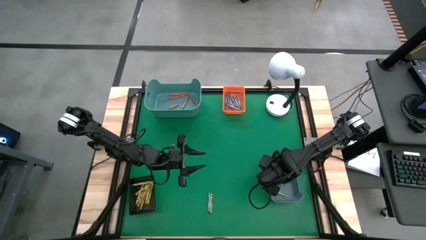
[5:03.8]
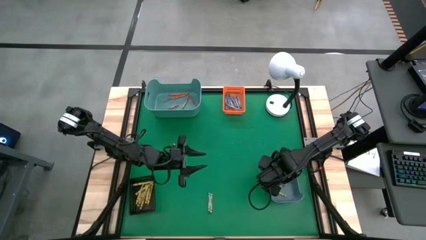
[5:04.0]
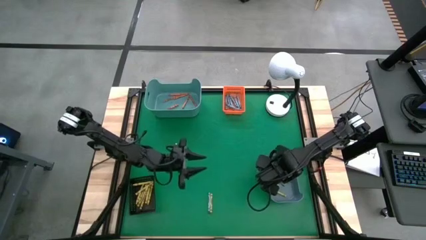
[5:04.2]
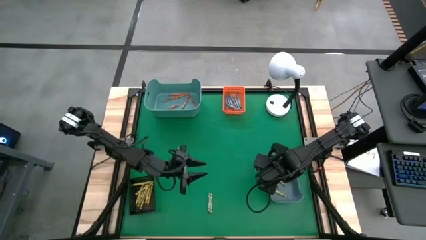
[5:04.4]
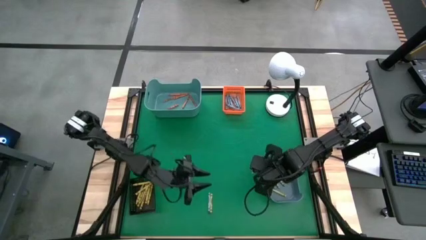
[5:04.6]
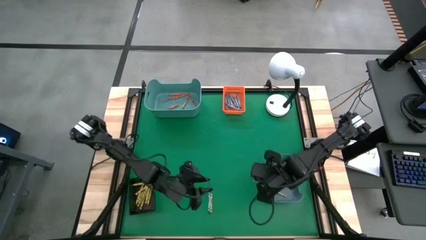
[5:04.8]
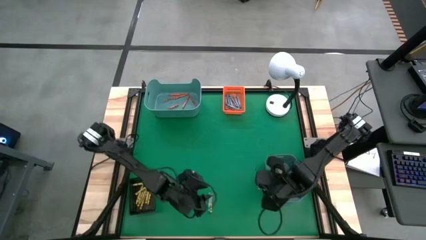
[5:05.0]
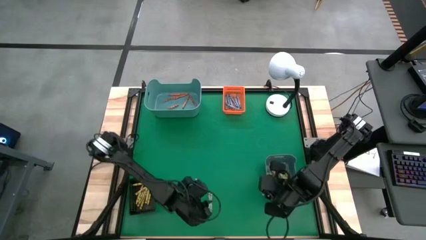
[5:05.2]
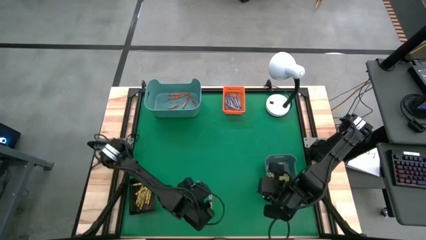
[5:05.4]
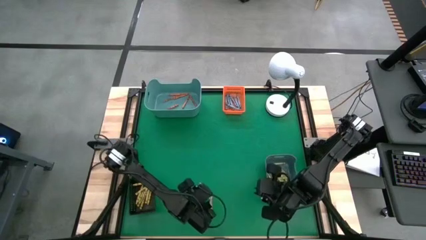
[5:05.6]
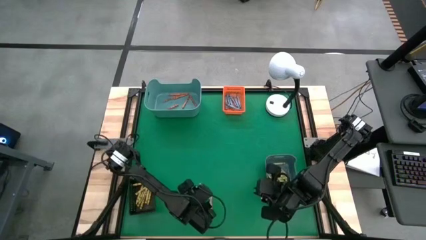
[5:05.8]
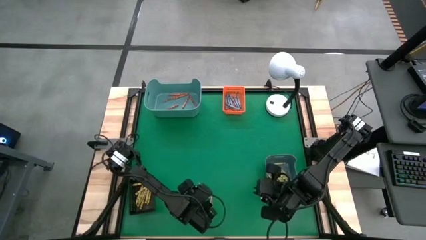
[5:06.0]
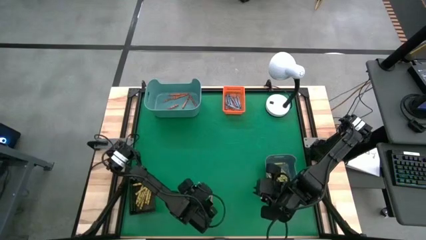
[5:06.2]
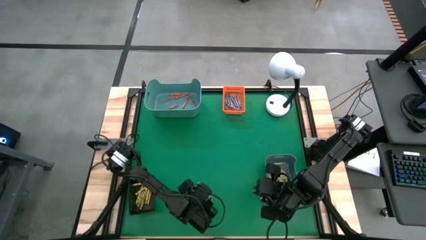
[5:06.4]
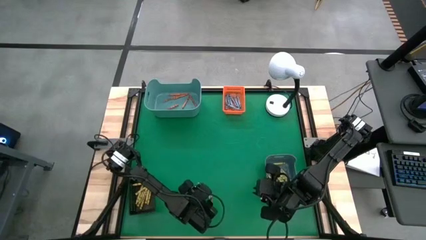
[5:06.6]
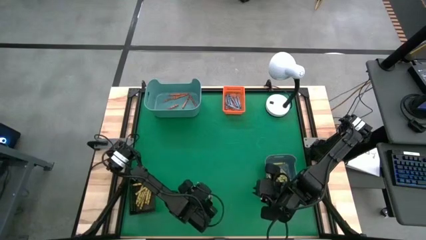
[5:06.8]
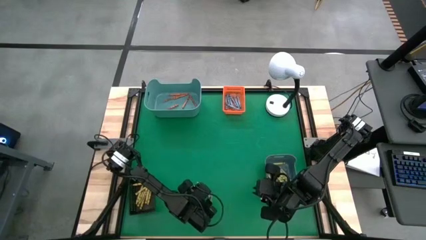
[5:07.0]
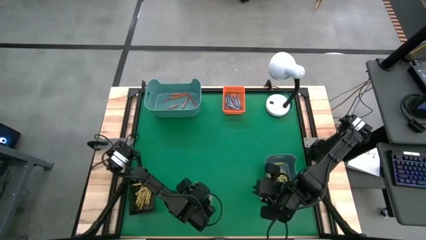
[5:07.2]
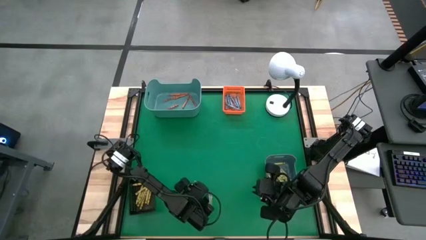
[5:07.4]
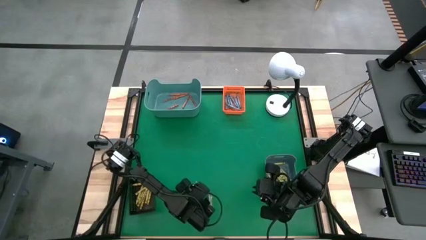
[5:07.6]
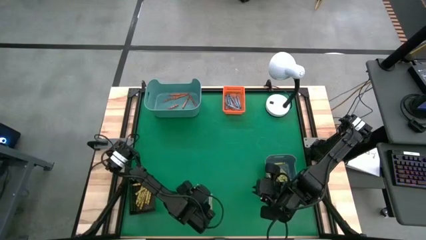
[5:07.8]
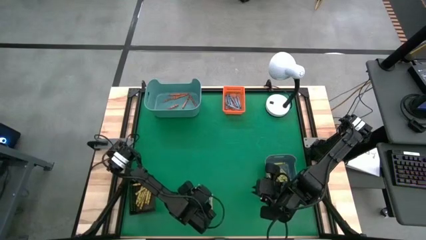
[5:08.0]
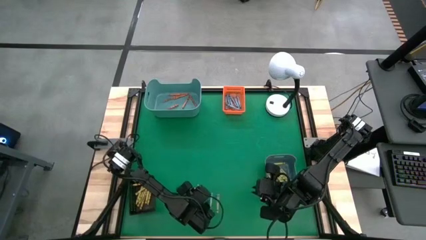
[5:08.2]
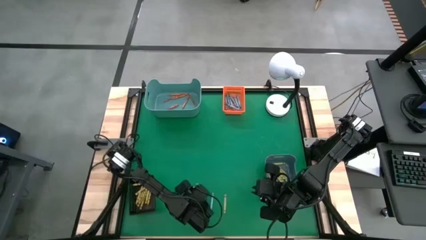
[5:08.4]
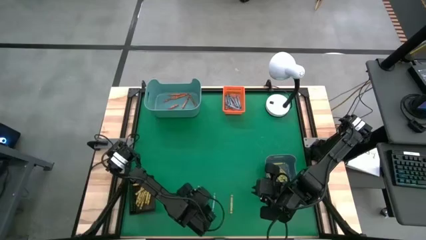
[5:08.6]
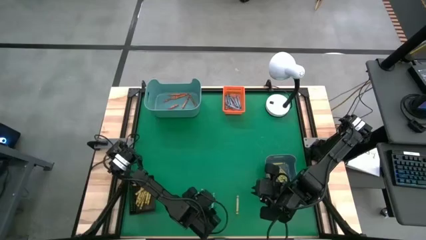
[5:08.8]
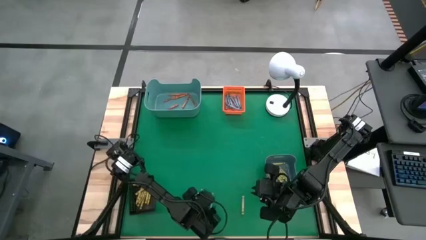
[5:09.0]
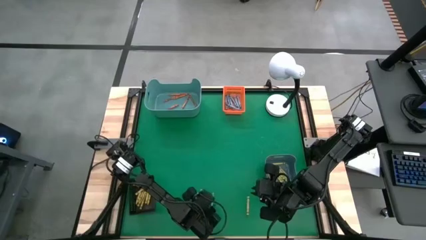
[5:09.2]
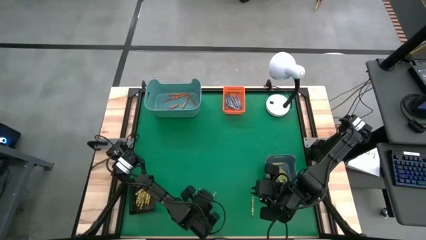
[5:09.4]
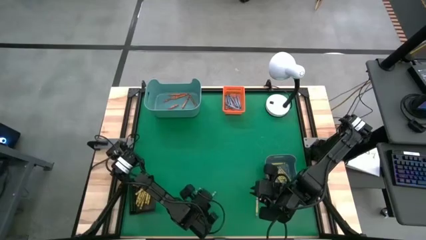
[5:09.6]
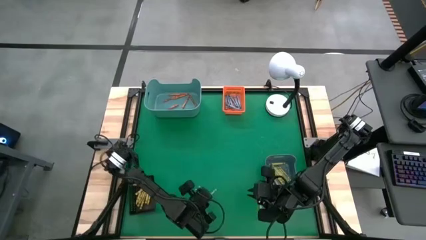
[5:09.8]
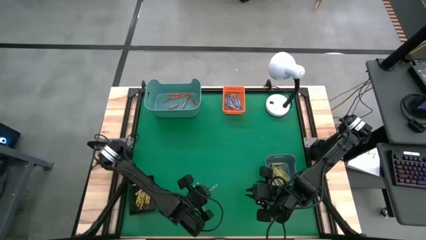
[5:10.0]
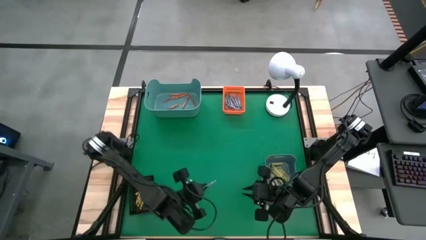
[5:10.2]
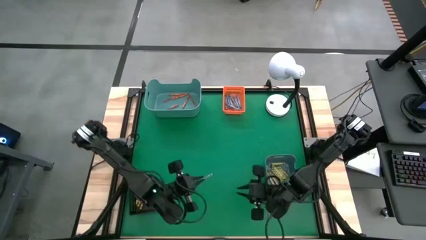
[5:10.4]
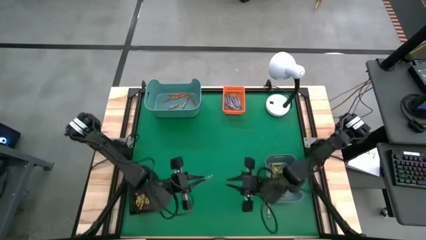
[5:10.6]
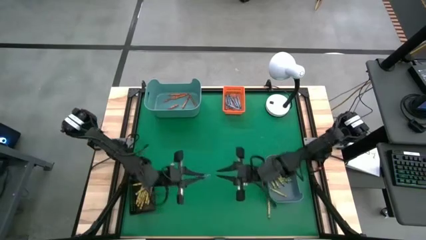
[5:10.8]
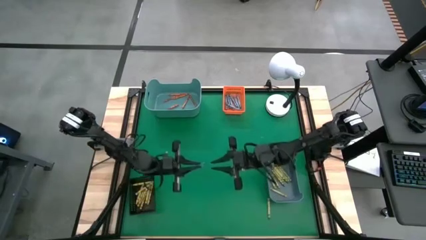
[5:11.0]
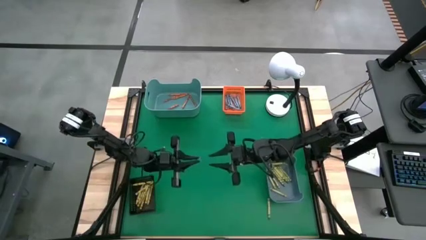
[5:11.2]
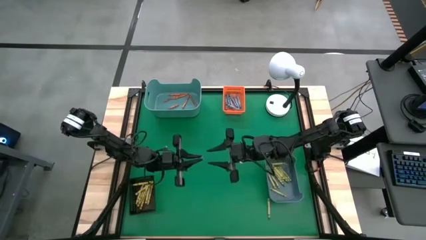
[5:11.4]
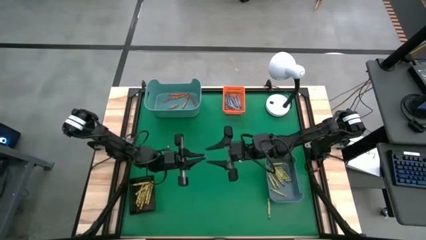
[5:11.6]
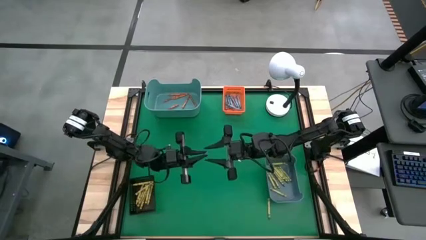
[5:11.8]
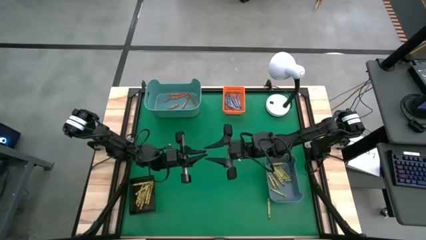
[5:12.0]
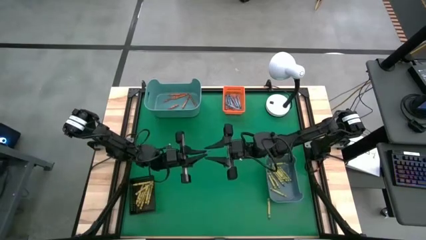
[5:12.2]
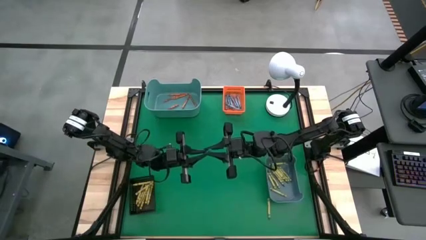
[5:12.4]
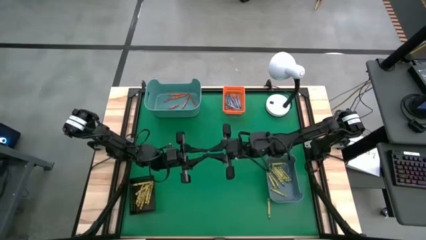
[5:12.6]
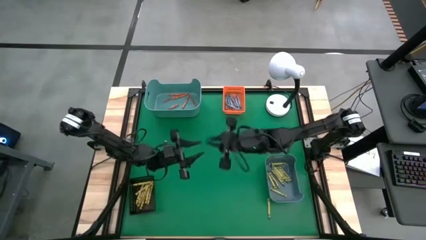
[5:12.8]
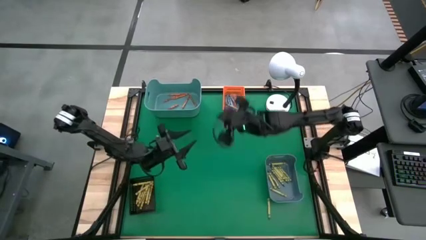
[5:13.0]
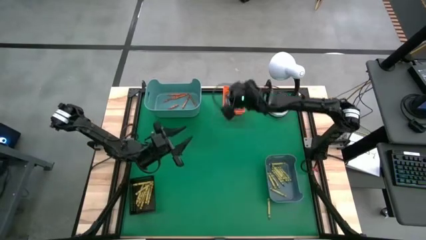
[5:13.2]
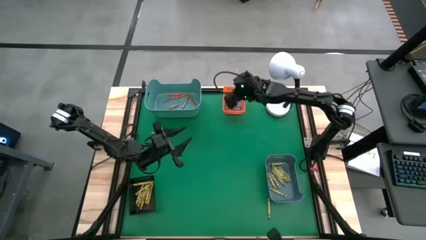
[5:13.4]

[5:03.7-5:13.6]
Task: Sort crayons
Put the blue crayon into the orange bin

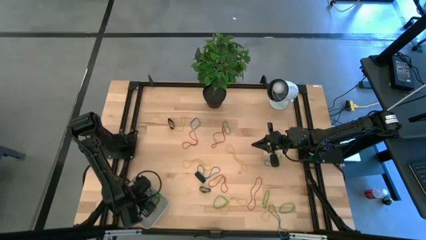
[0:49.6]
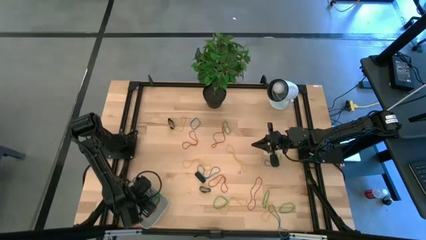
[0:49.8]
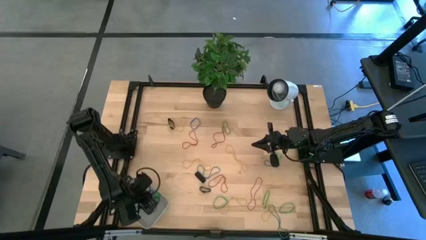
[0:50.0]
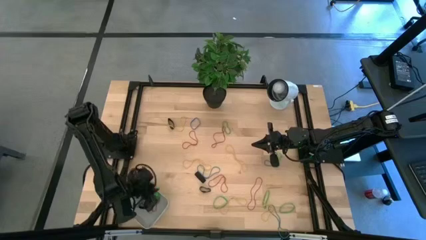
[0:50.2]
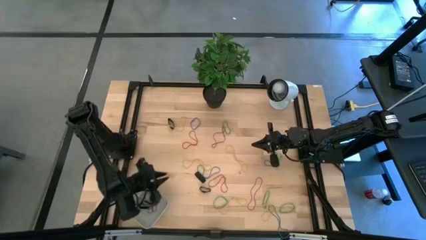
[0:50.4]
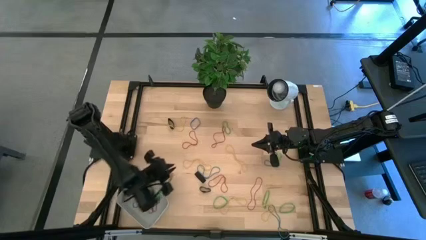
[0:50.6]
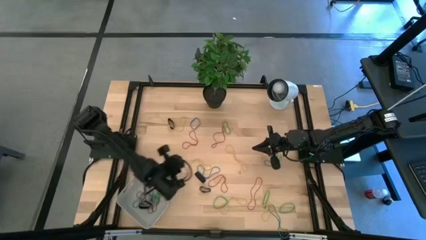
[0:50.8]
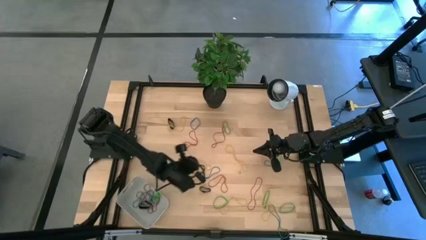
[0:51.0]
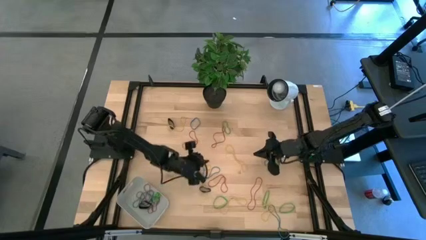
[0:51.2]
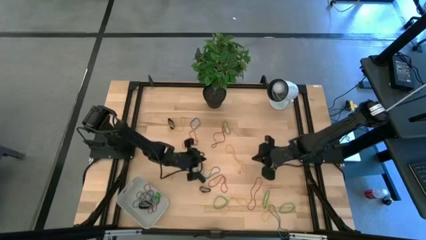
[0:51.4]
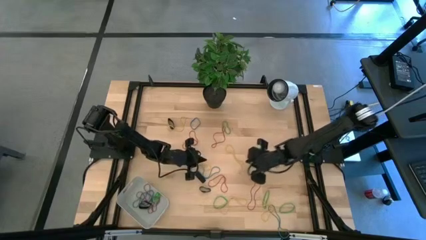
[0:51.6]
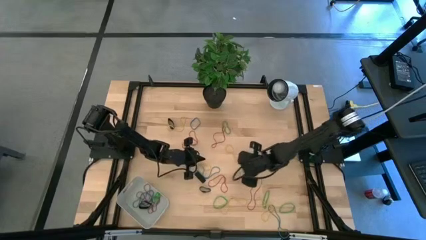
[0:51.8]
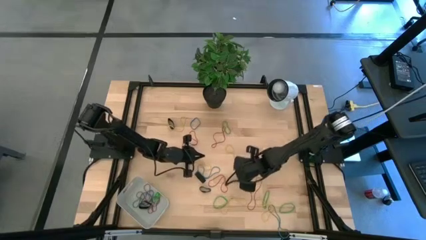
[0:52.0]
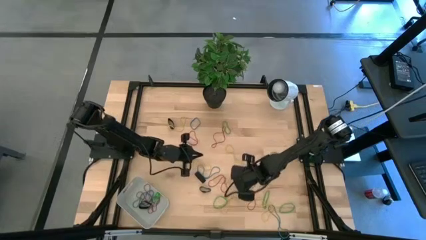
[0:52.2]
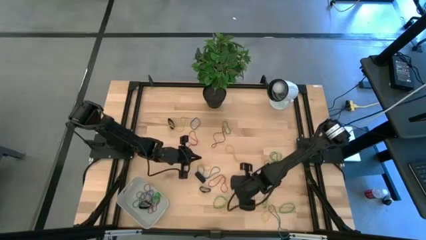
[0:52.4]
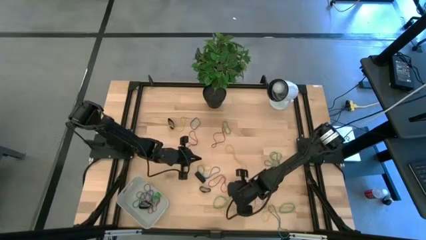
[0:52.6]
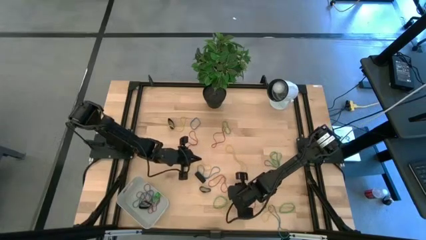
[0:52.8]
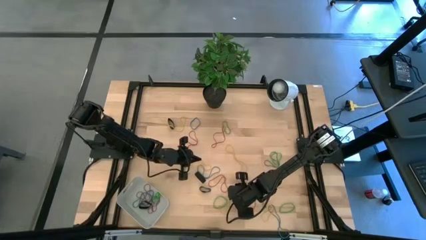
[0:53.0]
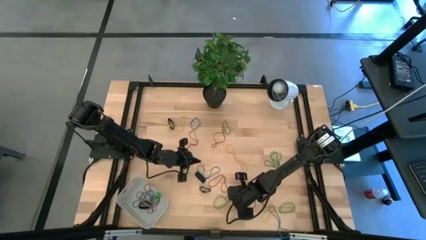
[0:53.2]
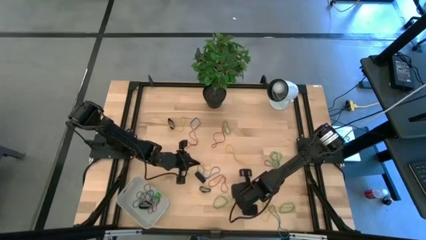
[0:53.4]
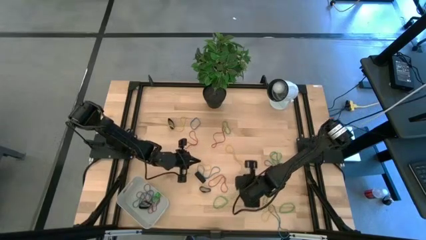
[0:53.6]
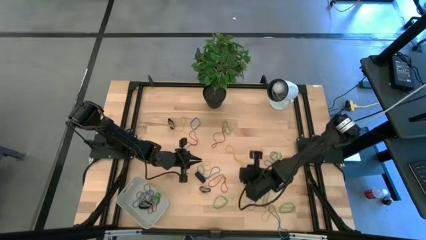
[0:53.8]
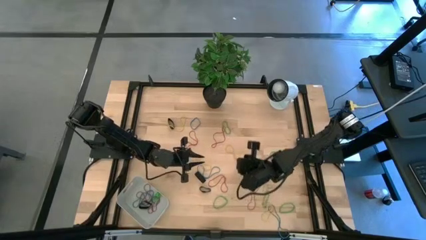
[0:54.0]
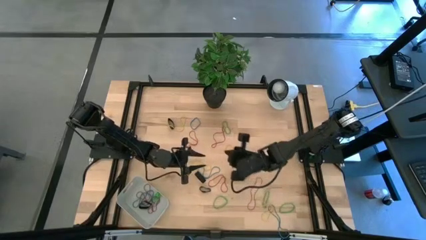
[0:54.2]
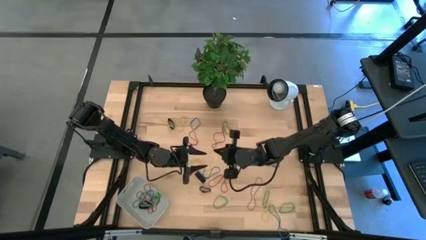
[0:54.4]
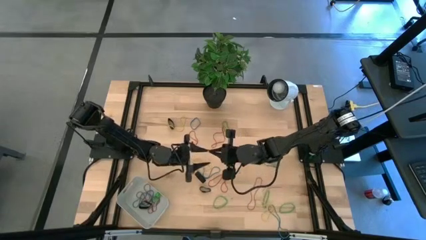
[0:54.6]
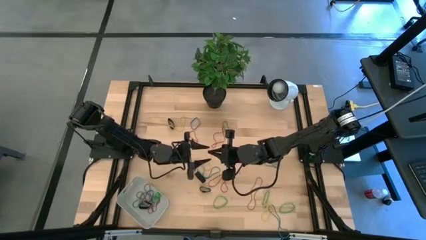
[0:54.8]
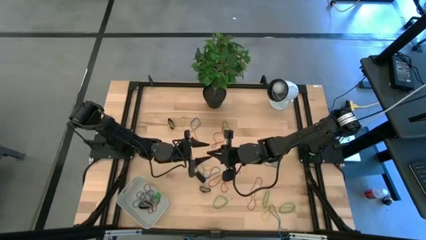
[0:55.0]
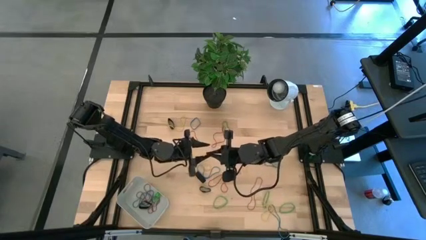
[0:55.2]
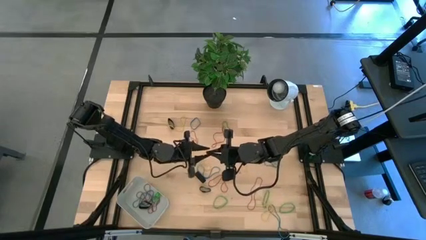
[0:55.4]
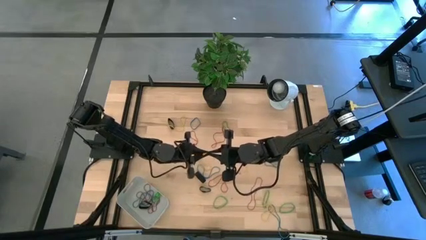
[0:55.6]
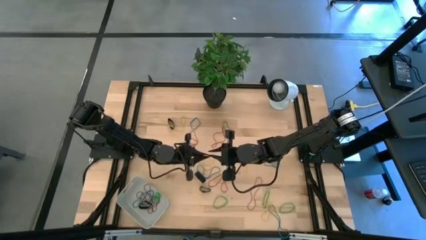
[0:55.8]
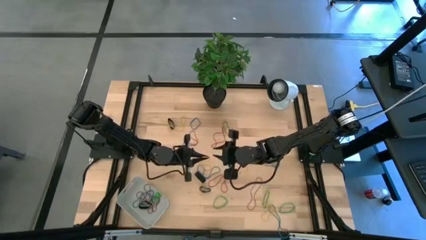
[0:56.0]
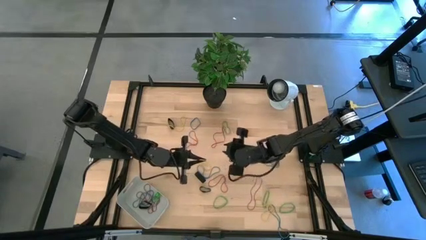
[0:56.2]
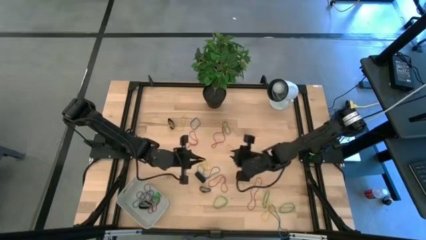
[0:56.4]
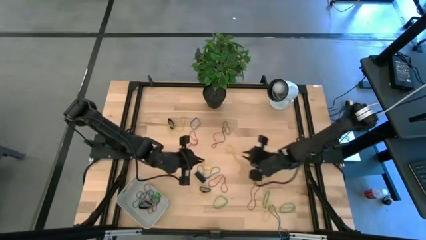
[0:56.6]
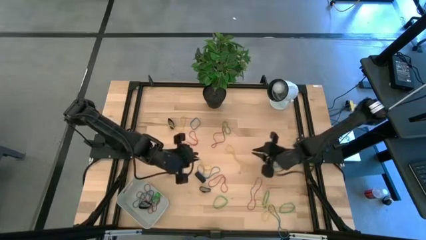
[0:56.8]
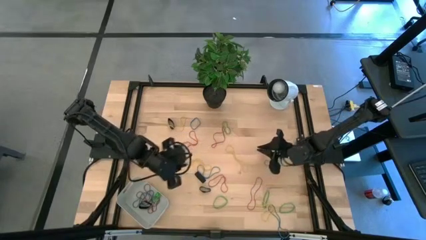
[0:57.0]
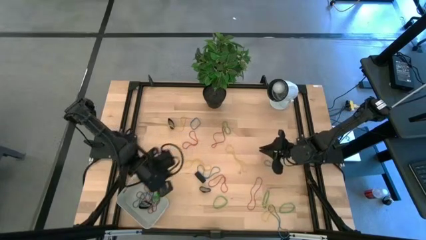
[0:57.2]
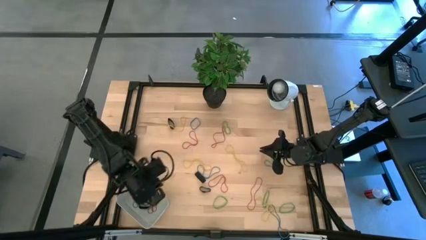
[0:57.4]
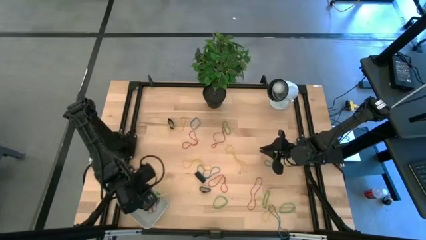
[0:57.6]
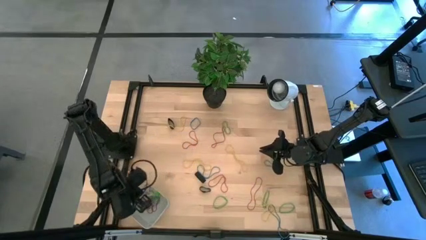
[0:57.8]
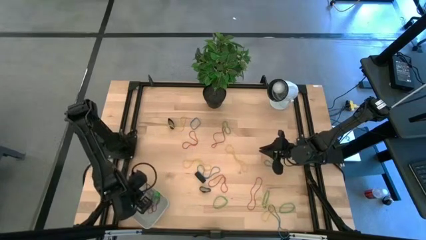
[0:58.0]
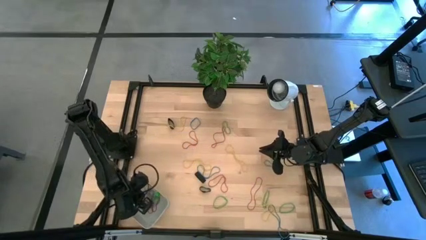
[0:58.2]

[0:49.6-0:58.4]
Task: Pick and place rubber bands into bin
Put the yellow rubber band into the gray bin
